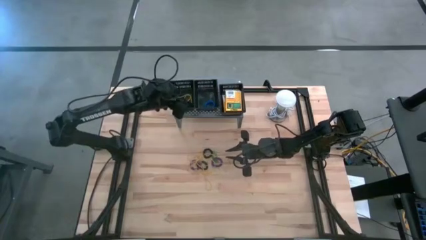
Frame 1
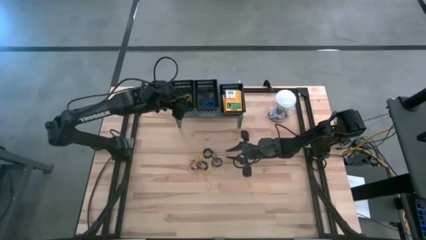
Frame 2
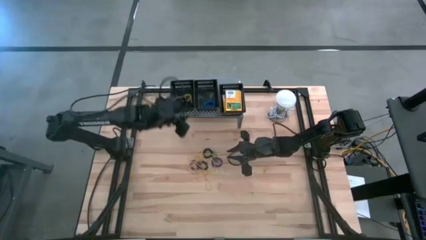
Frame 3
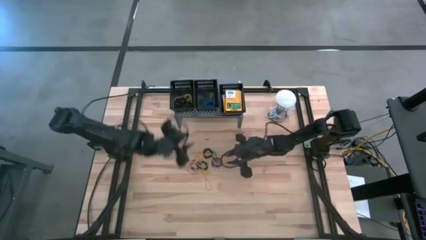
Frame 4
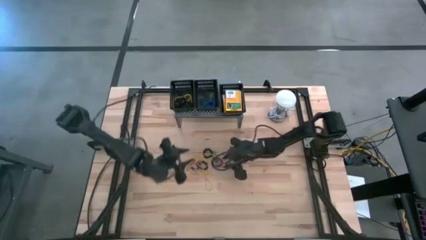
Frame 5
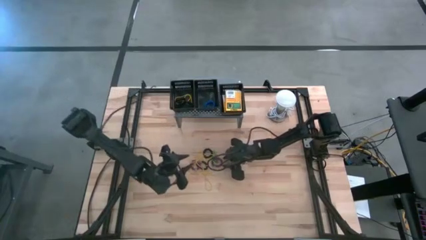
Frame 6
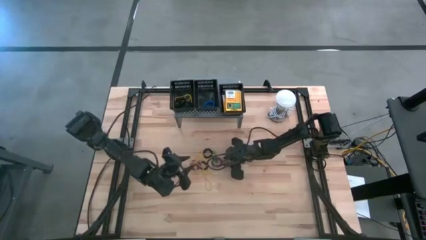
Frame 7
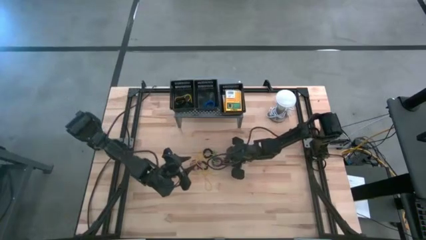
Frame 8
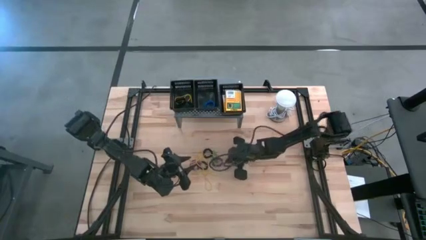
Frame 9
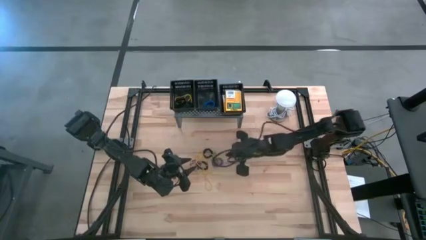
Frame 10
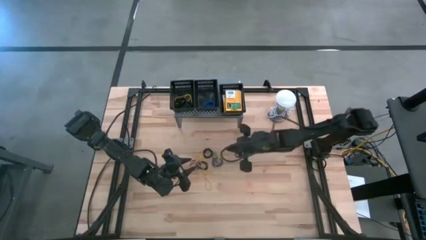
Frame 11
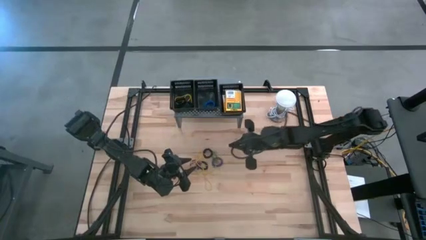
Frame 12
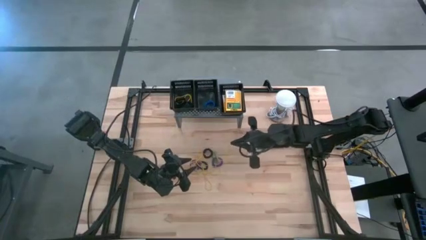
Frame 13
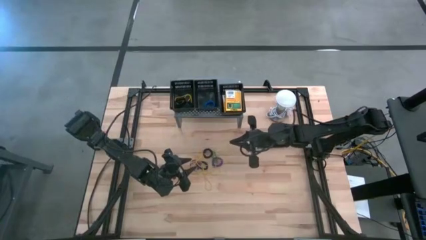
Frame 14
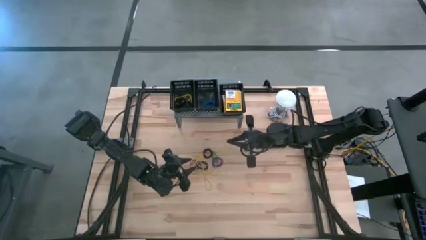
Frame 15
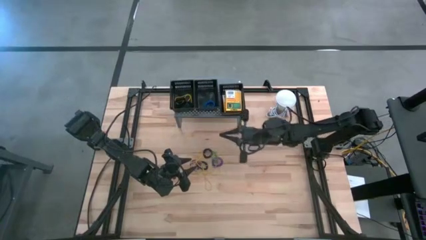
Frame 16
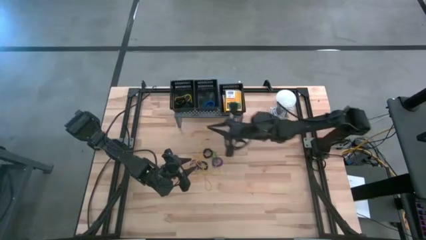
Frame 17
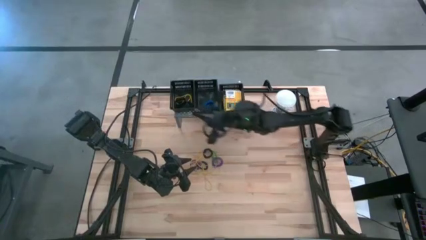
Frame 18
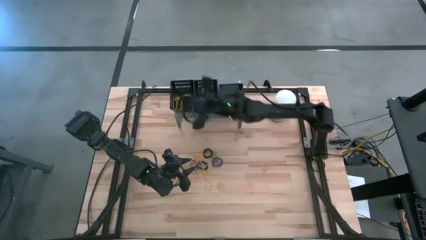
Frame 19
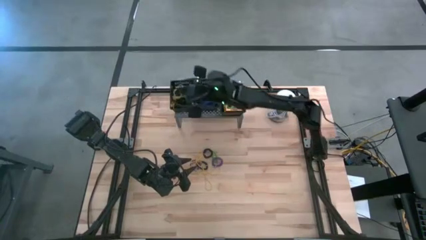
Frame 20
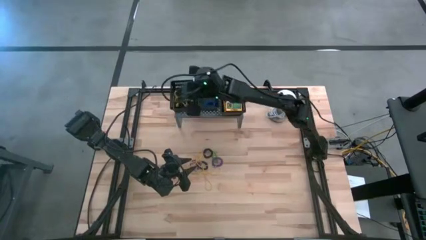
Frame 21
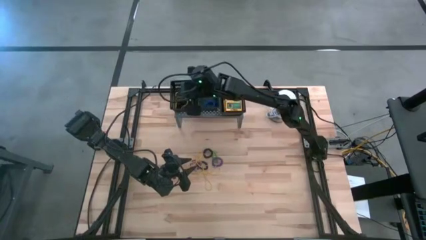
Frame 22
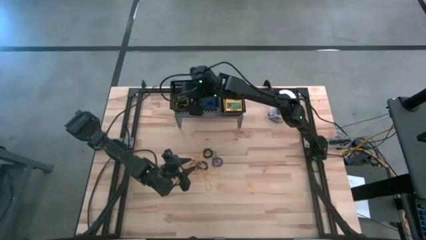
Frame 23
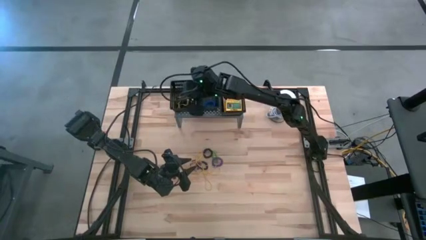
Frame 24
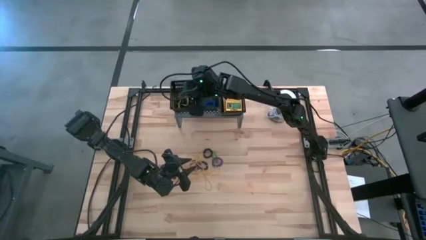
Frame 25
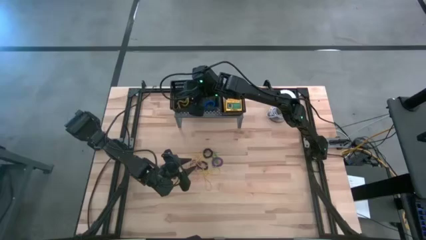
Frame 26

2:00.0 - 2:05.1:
Task: Pick & Place Office Desk Supplies
Put the yellow rubberband into the left black bin on the shelf

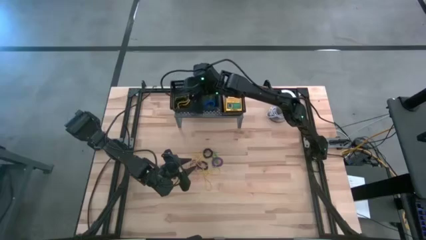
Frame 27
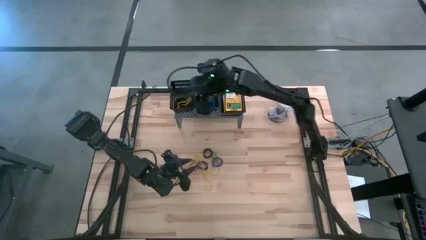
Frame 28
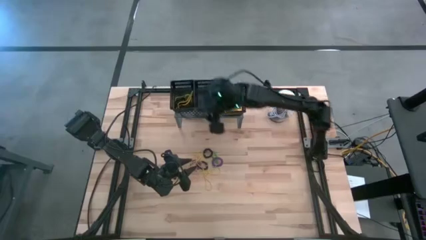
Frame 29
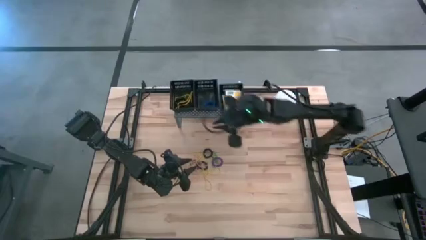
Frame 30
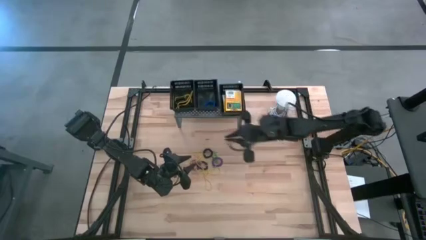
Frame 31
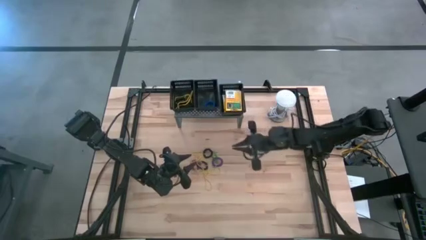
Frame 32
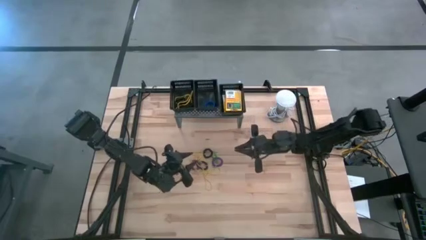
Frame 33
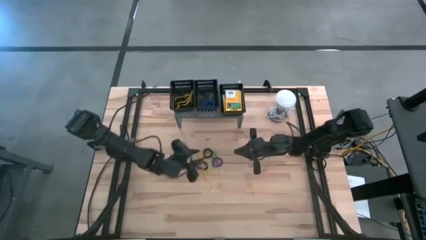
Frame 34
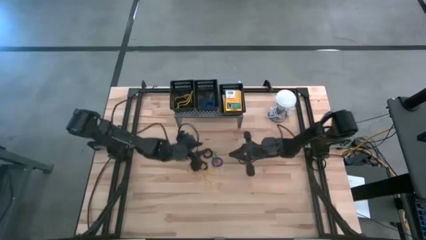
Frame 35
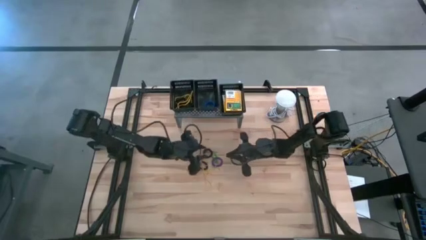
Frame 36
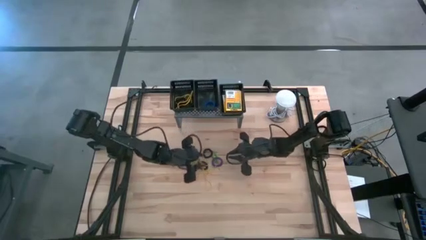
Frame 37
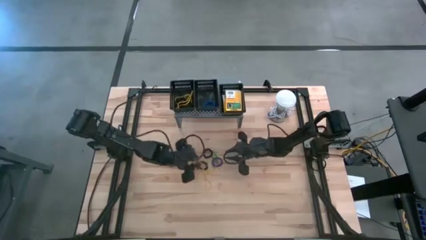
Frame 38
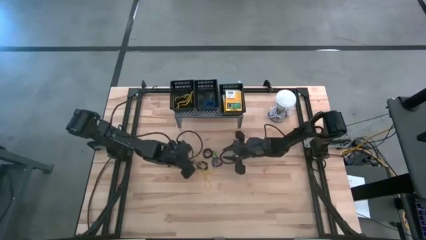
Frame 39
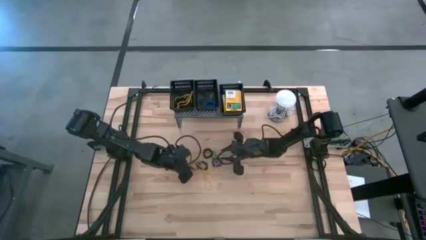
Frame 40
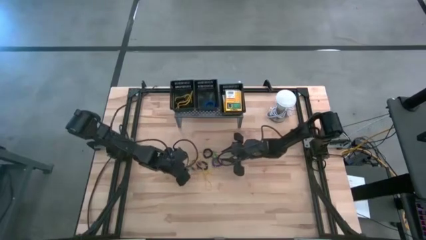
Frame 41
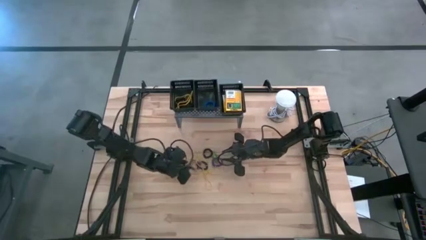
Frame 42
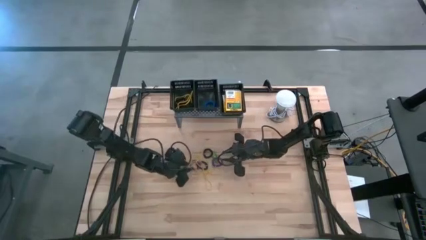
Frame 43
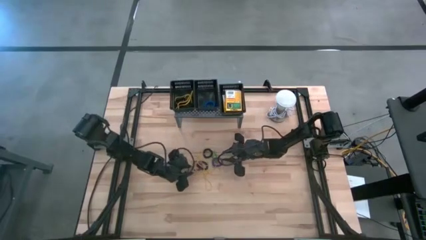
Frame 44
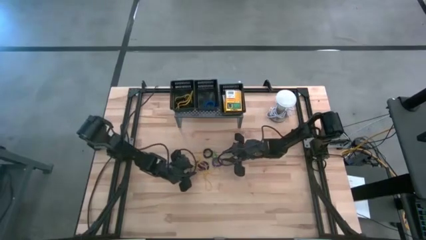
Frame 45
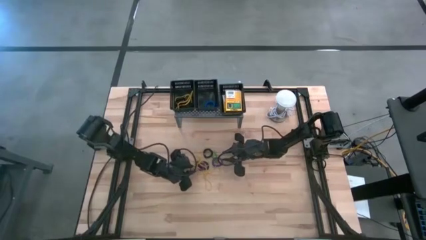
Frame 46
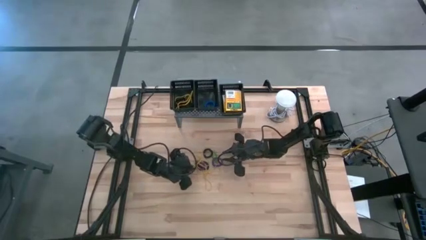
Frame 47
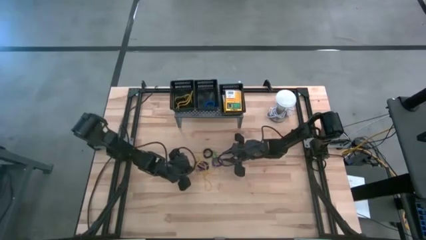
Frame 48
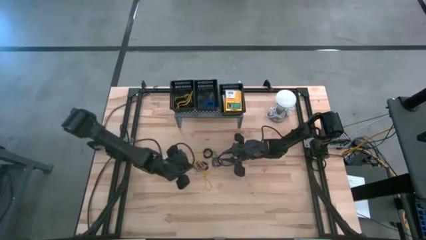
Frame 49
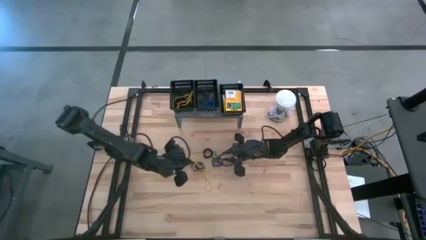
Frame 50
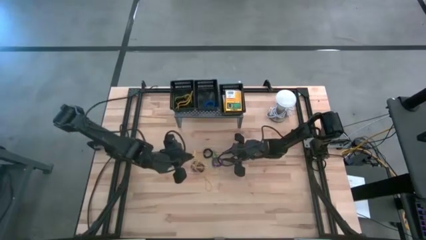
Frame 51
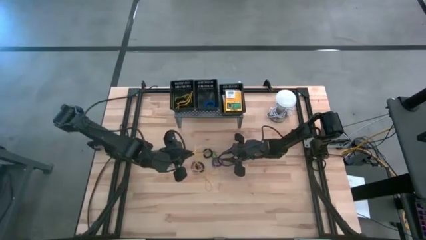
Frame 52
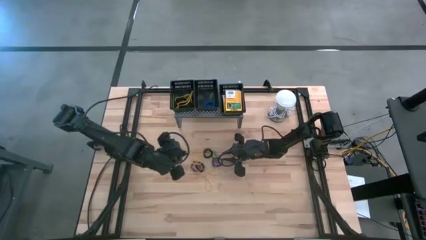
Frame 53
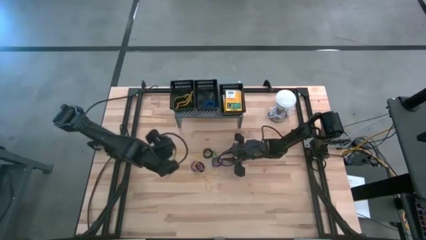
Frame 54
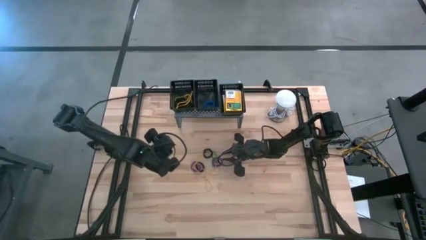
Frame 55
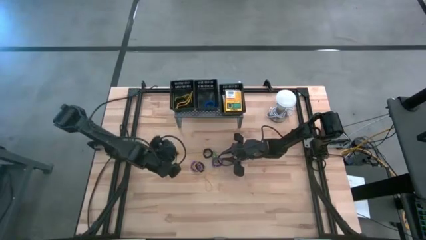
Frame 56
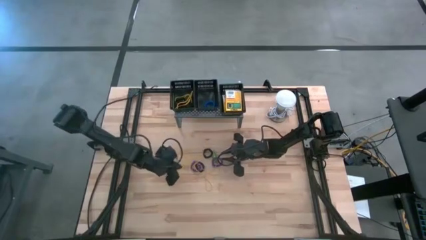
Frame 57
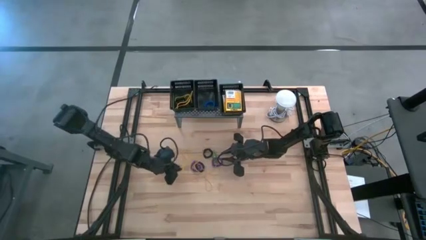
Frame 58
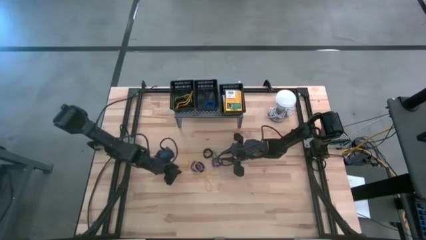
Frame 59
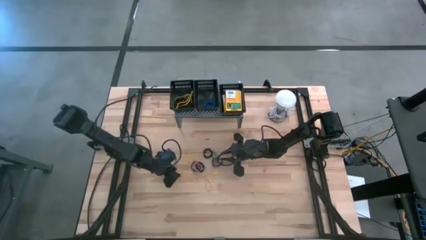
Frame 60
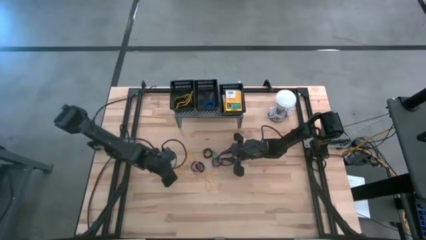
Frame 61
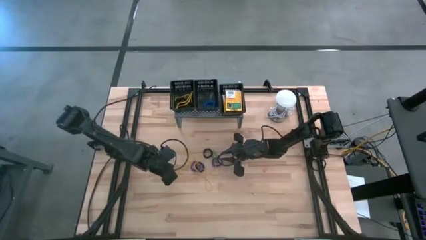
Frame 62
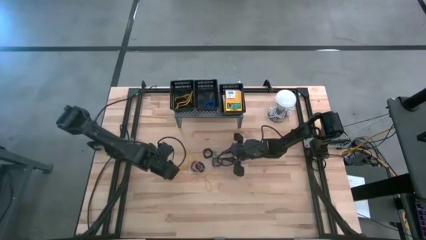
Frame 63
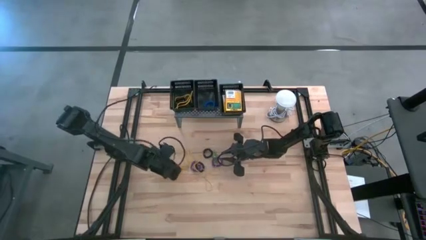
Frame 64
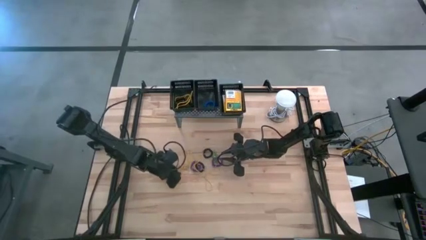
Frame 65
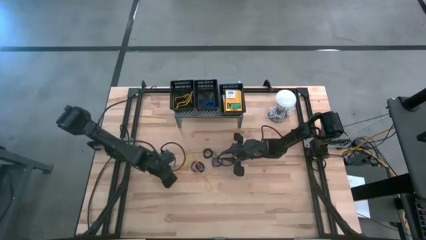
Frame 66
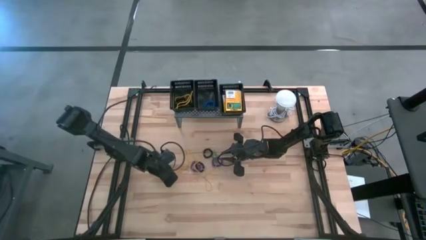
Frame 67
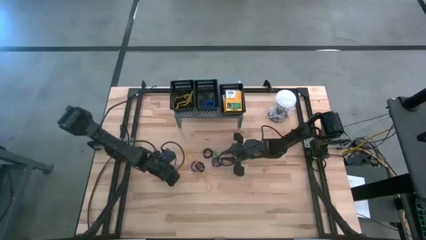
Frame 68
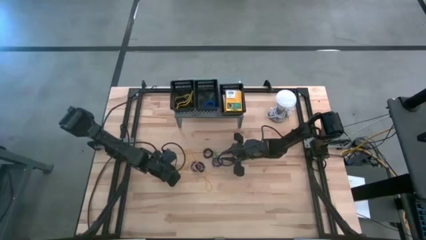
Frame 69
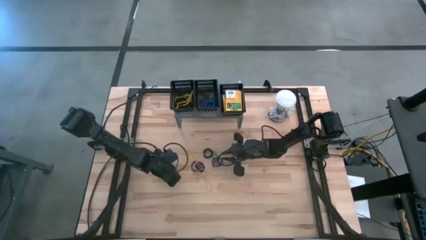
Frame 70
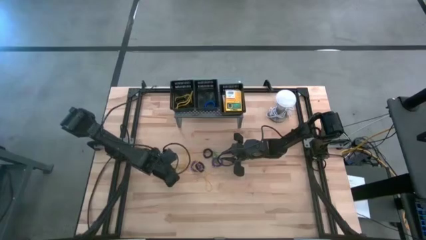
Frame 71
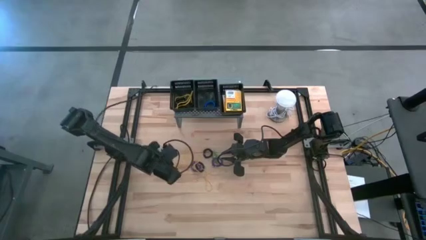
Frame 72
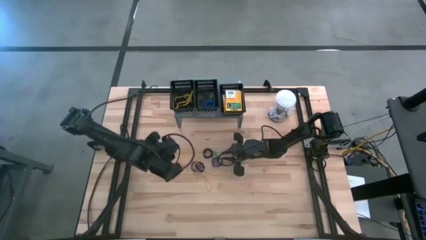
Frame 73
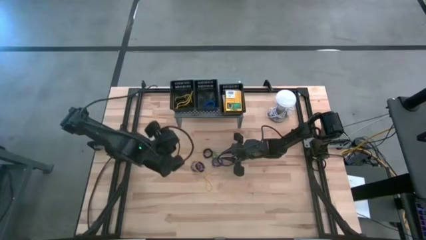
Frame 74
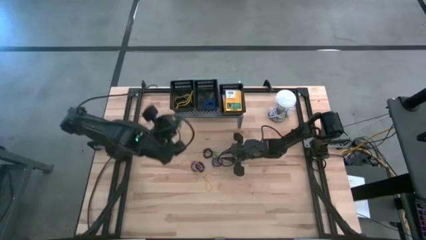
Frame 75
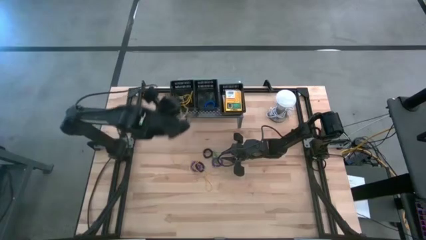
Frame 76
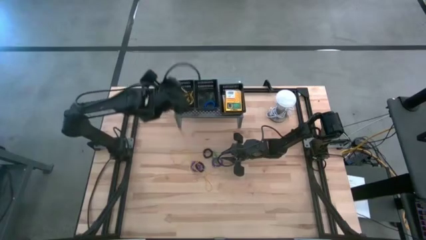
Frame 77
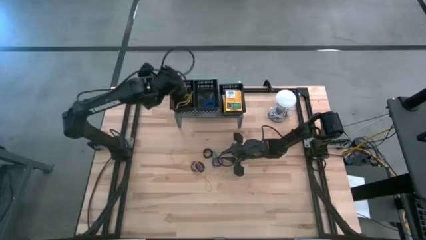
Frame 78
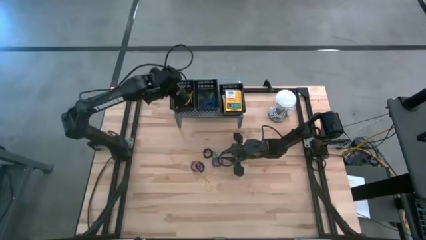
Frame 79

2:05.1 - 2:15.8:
Put the yellow rubberband into the left black bin on the shelf

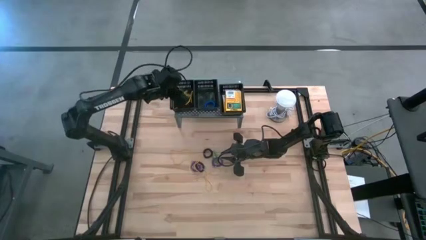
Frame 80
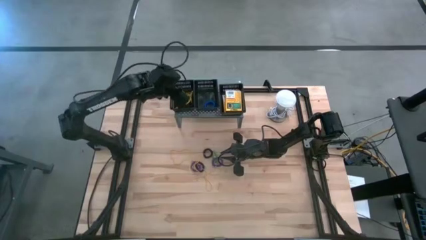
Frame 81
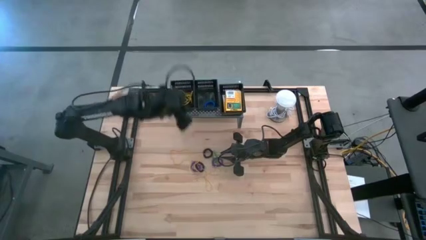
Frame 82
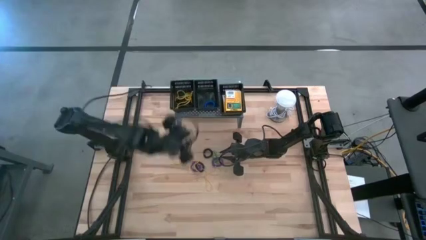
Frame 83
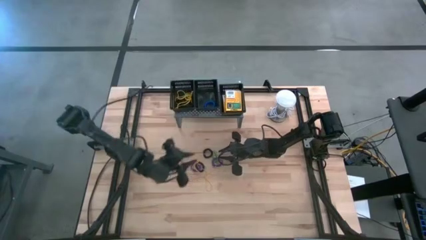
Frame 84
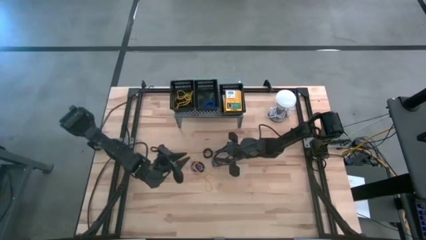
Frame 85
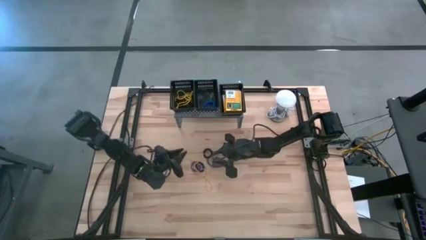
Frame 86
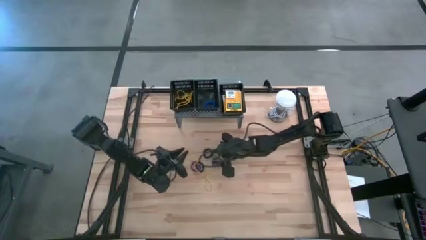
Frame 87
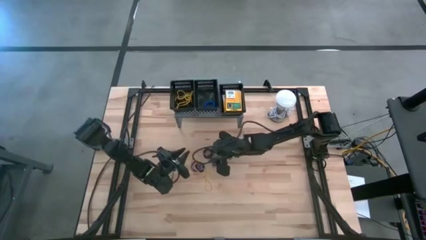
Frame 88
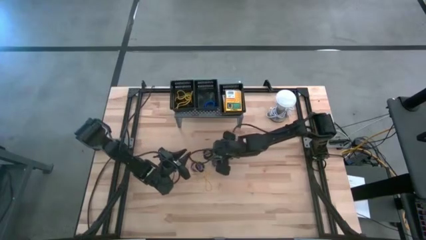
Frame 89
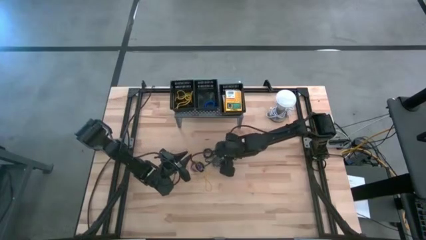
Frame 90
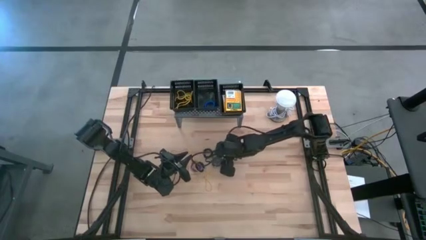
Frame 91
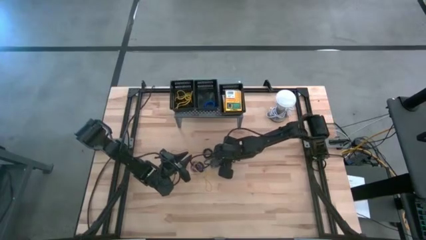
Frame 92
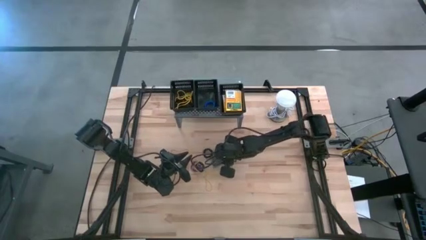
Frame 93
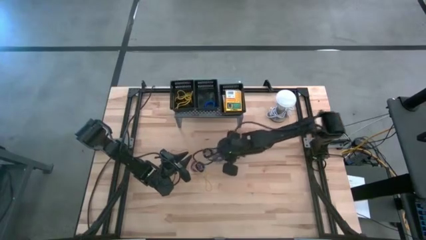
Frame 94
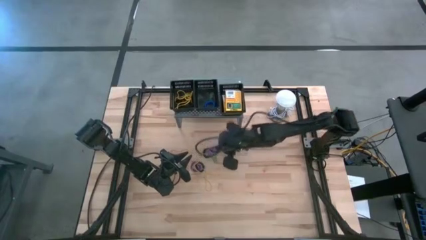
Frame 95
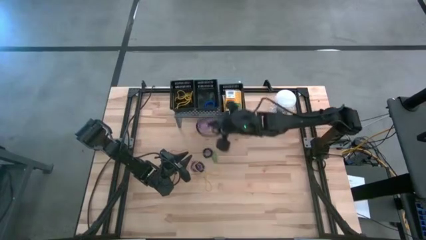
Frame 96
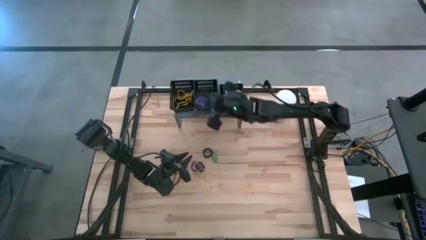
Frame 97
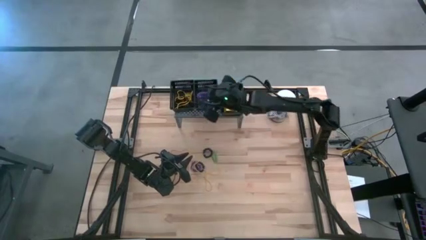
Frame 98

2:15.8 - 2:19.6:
Put the violet spring keychain into the middle black bin on the shelf
